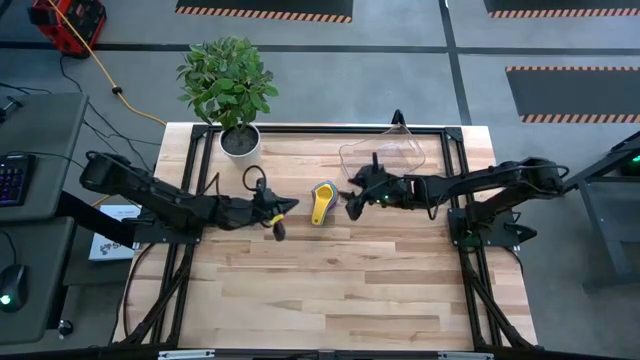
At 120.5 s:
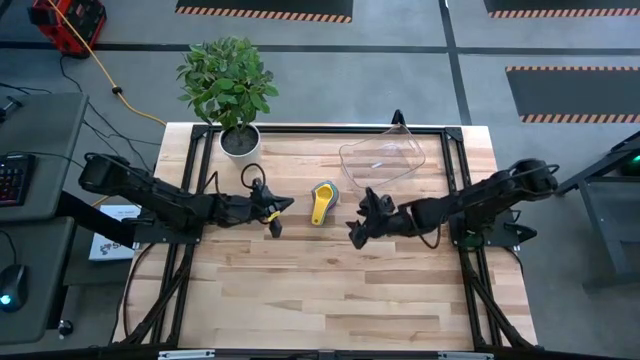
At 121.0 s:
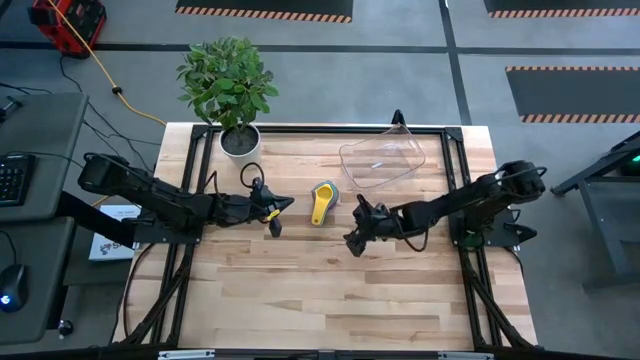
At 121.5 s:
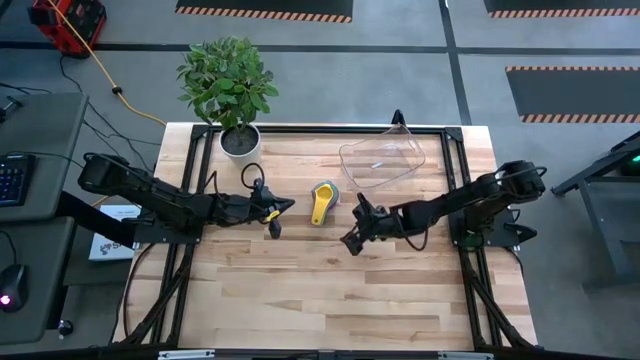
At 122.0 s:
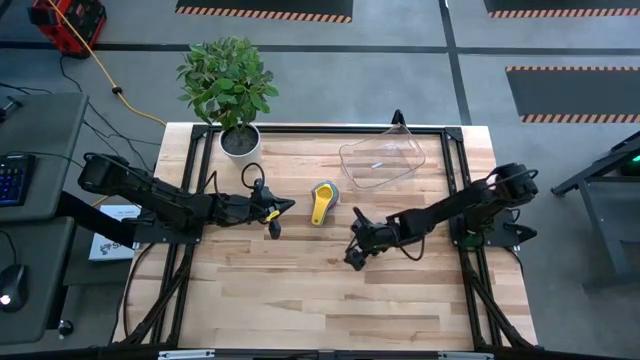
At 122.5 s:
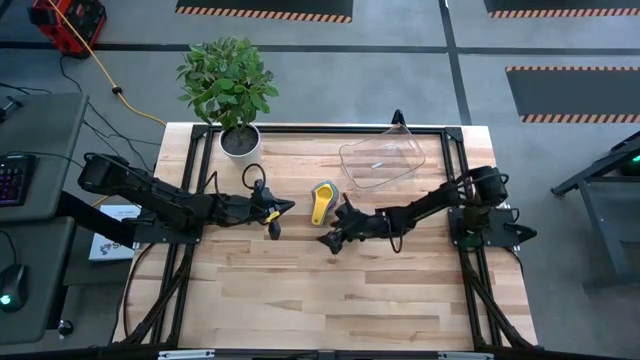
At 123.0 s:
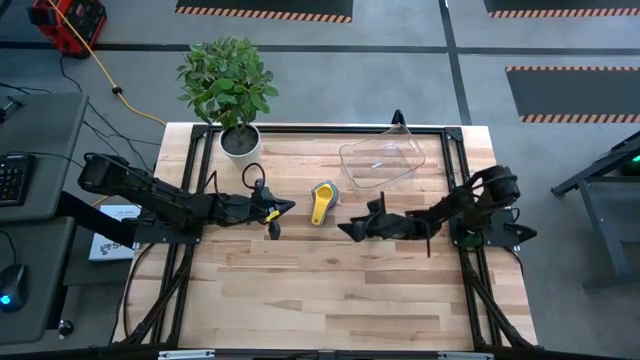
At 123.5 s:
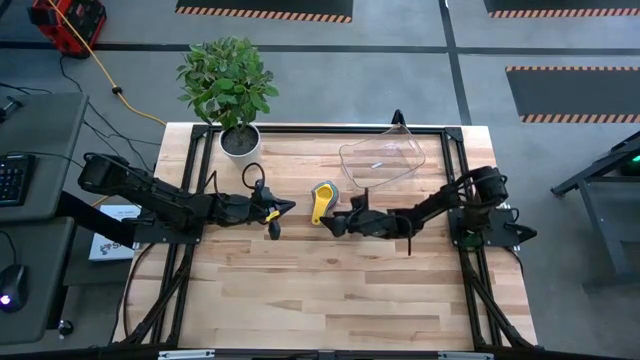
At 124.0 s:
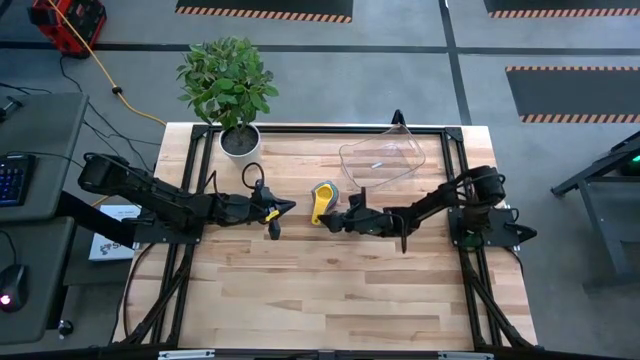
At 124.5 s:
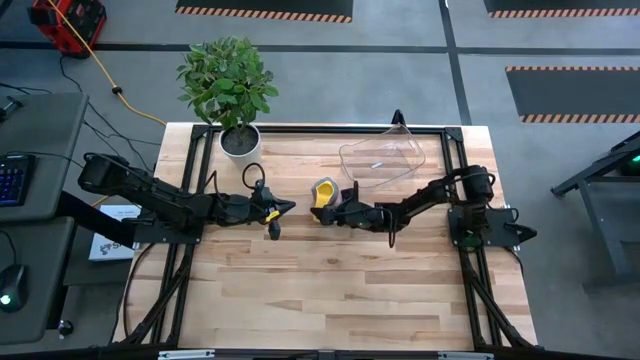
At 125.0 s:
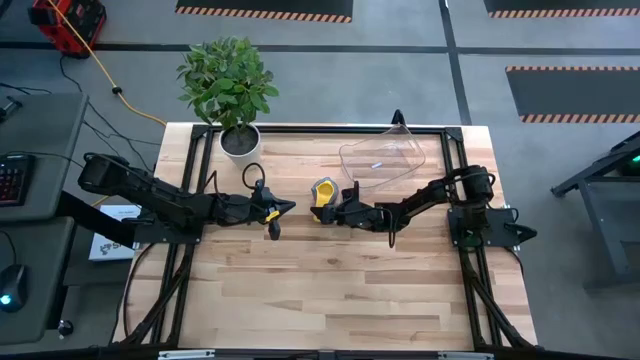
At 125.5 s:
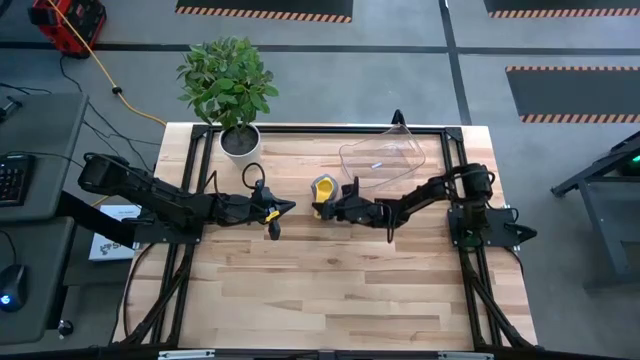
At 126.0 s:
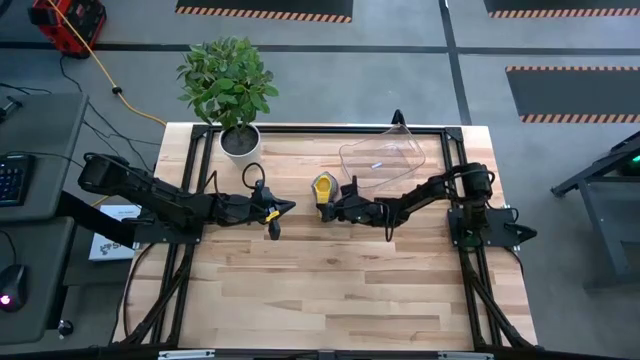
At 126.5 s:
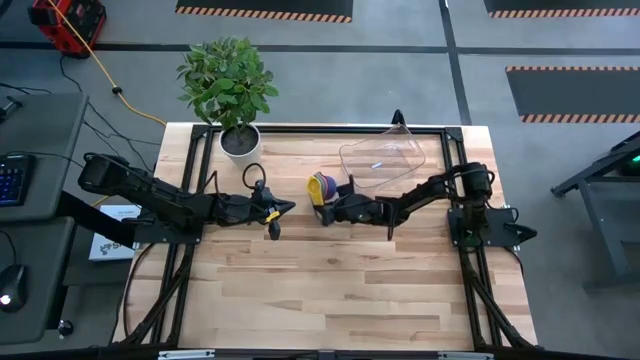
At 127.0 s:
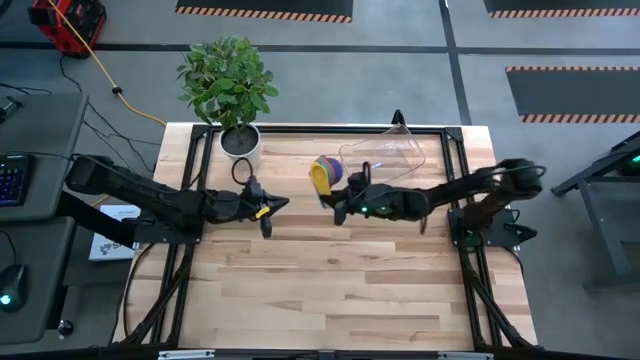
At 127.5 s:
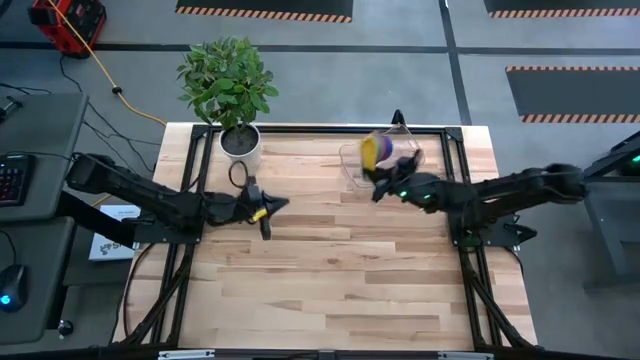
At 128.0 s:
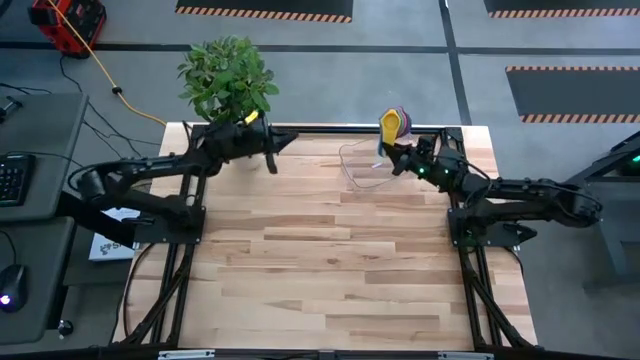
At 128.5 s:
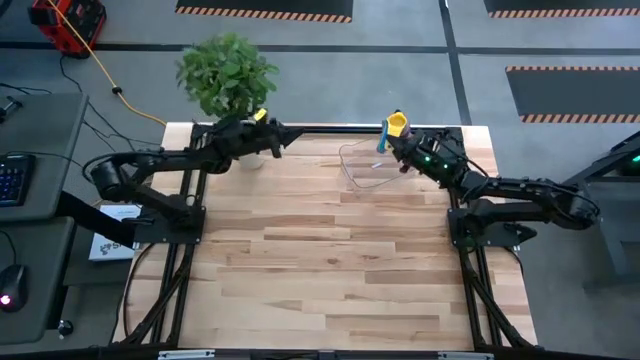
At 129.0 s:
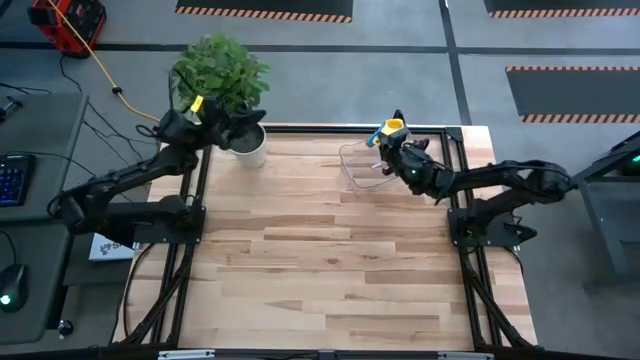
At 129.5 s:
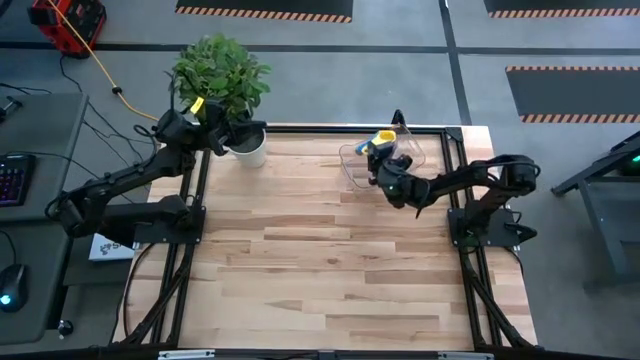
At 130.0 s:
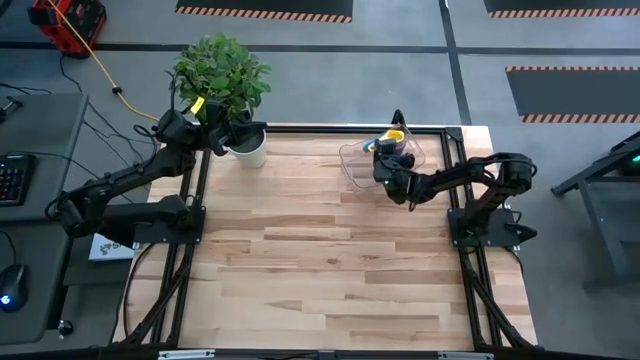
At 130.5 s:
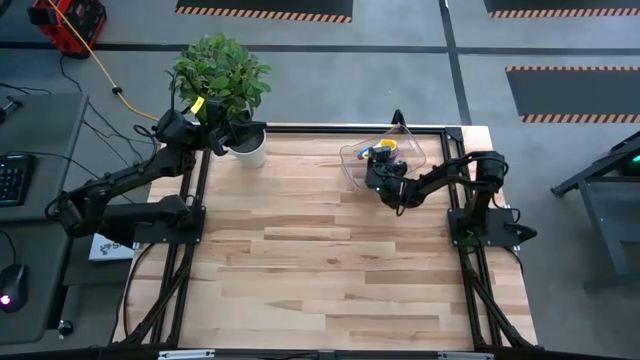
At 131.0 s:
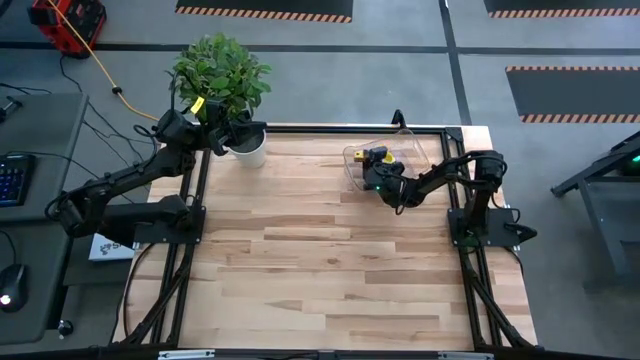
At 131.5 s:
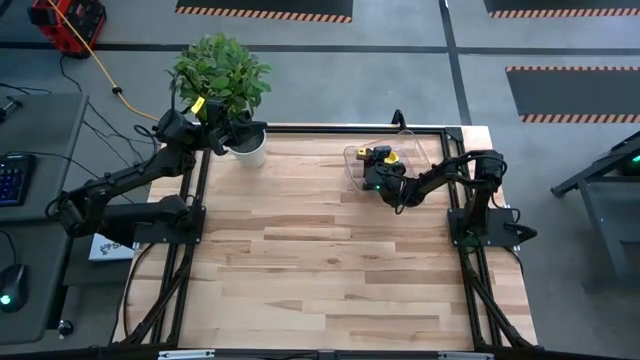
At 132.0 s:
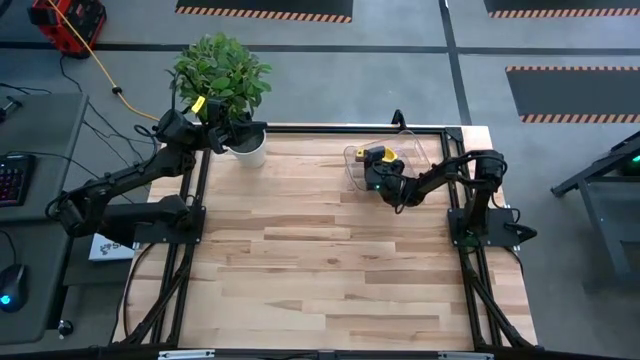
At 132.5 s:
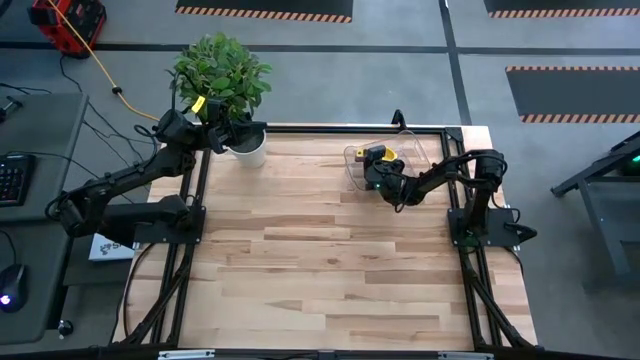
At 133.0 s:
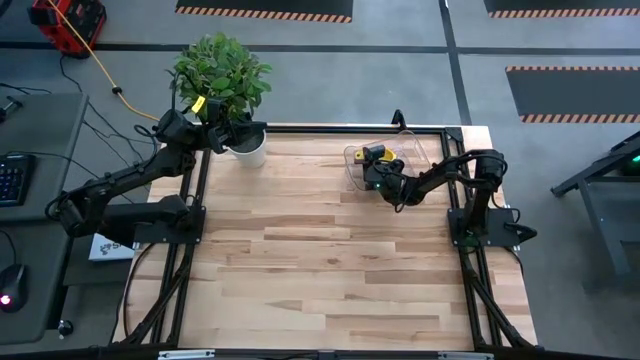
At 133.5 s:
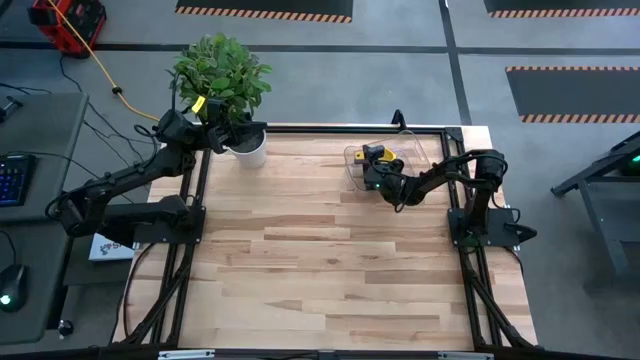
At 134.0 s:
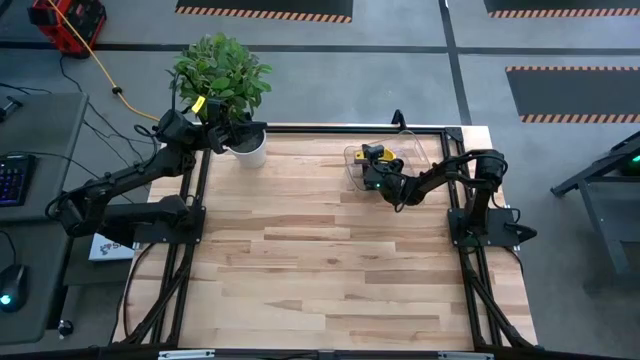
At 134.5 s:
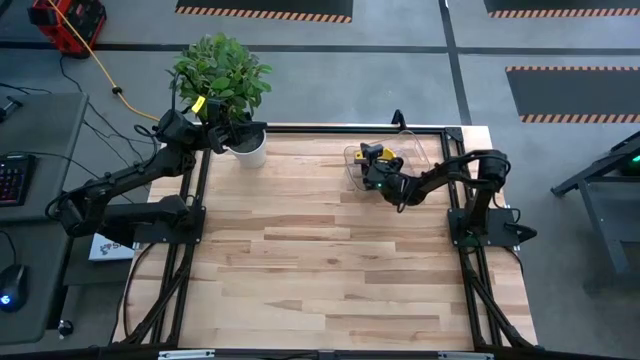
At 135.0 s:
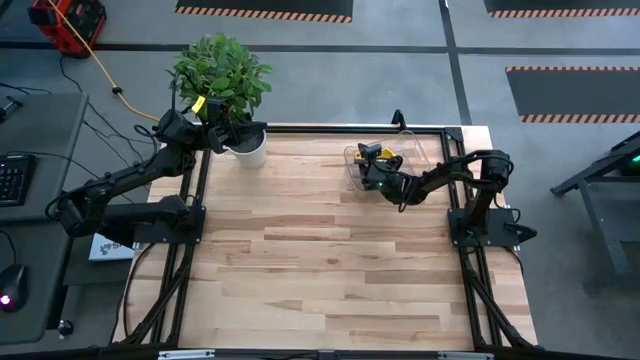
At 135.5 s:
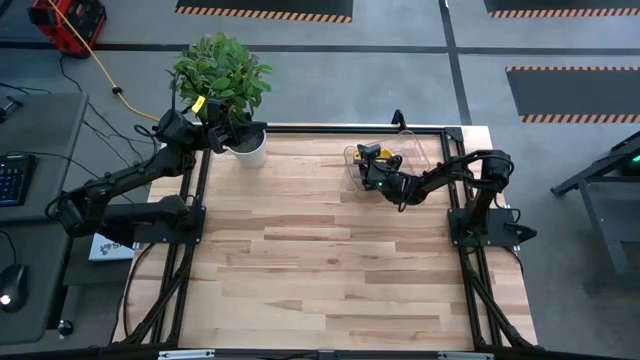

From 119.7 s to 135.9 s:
Task: Nest measuring cups in basket
Put the nested measuring cups into the transparent bin

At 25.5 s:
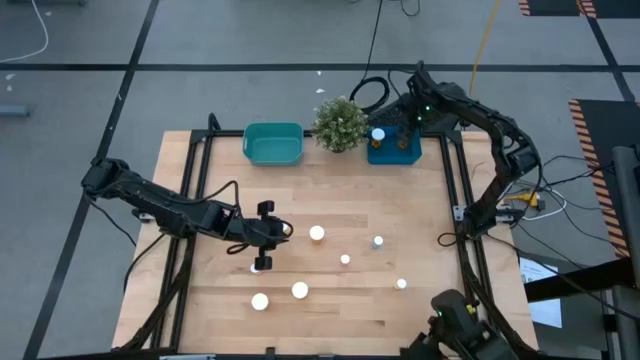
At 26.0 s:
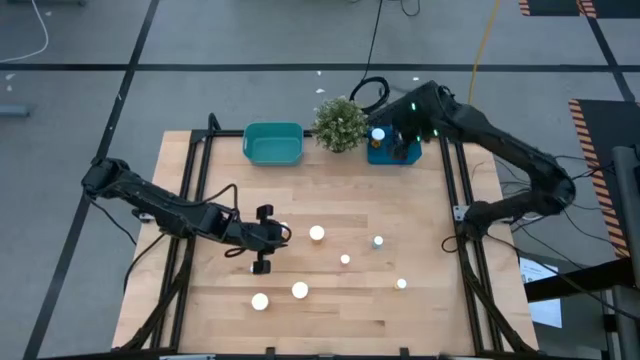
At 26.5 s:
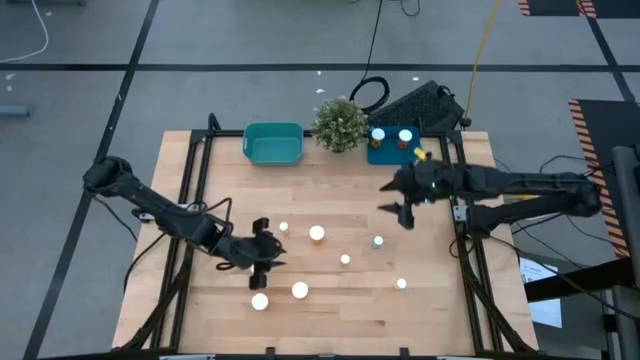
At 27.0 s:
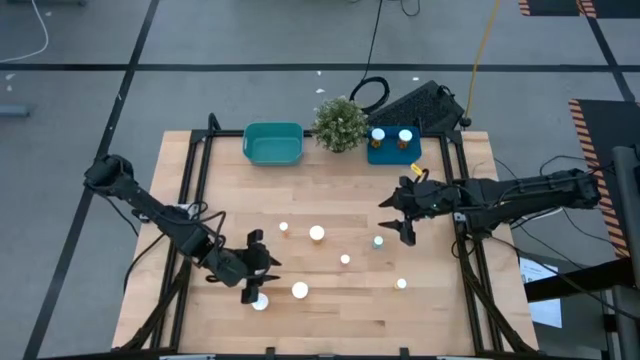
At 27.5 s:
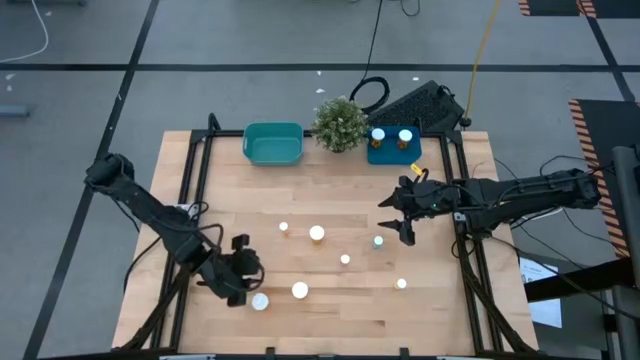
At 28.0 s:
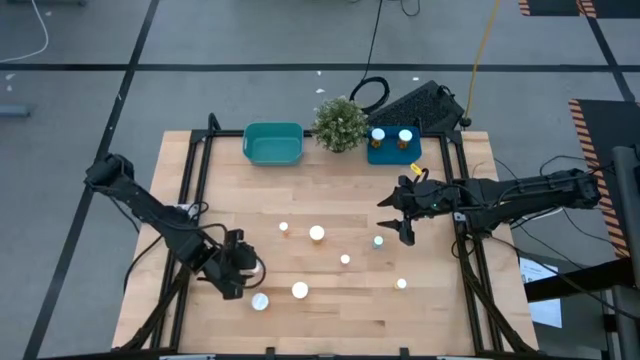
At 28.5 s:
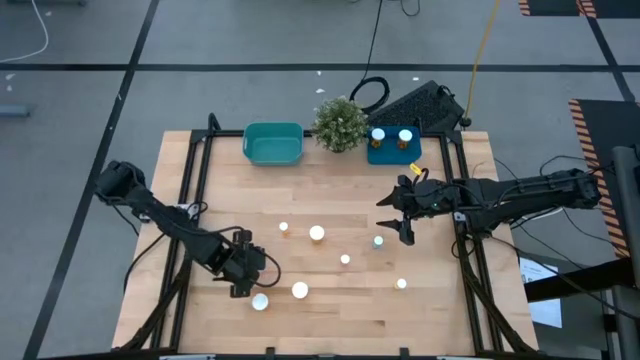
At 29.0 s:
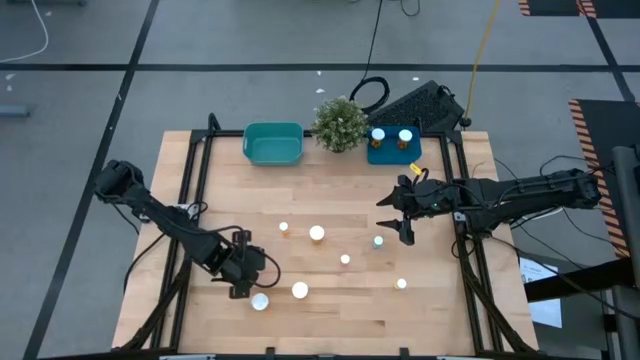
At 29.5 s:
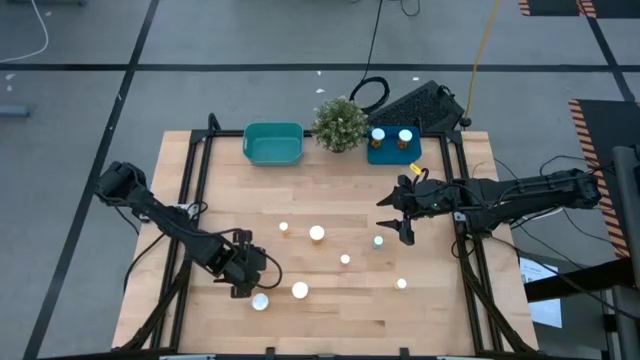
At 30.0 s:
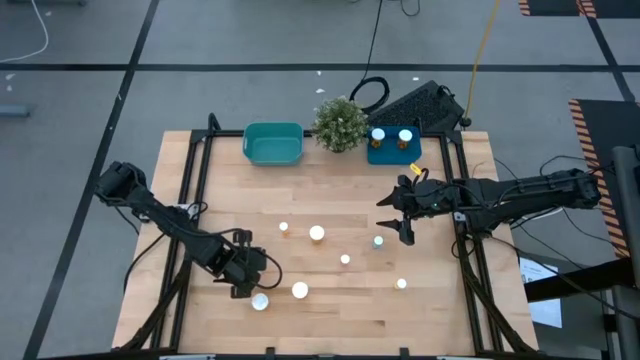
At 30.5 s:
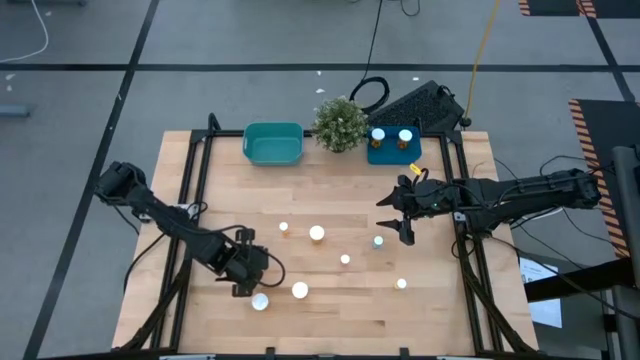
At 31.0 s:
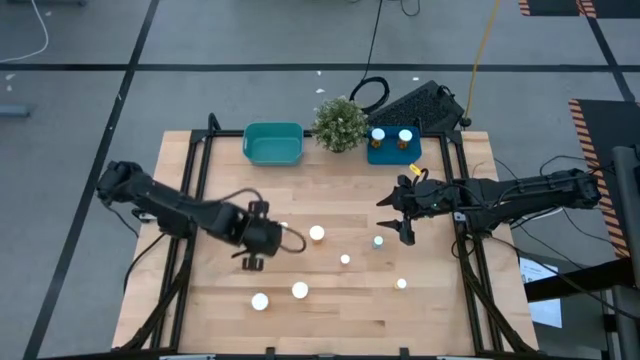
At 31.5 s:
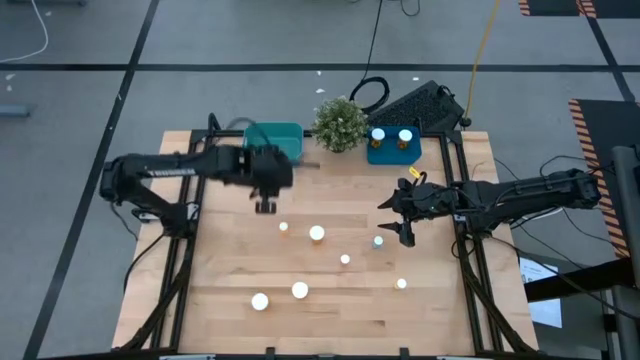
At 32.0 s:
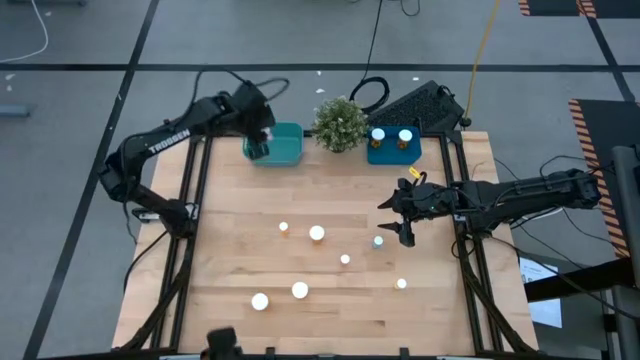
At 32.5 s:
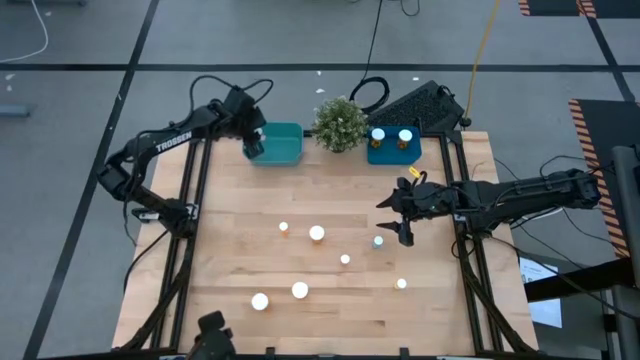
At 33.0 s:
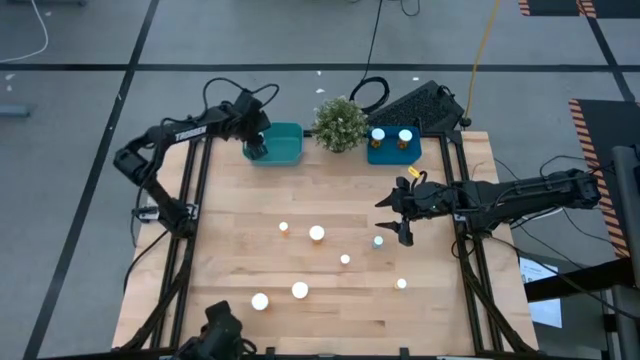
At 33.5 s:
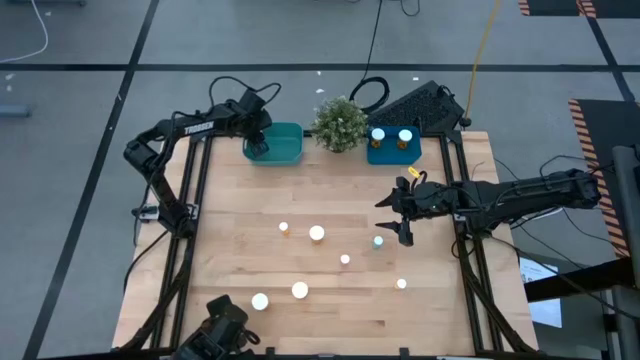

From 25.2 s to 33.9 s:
Task: Pick and place medicine bottles into bin by pill shape (circle, oval)
Put the pink small pill bottle into the green bin
